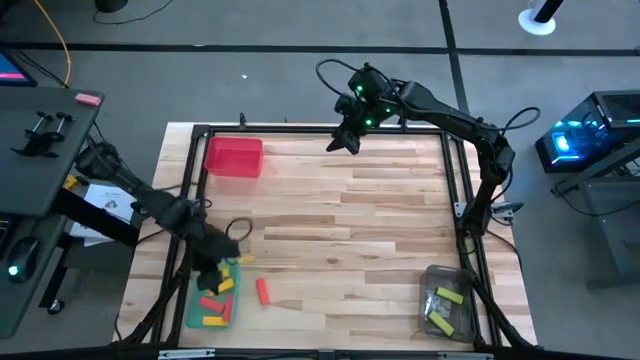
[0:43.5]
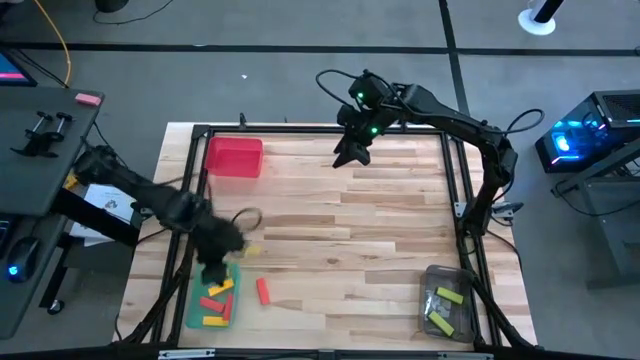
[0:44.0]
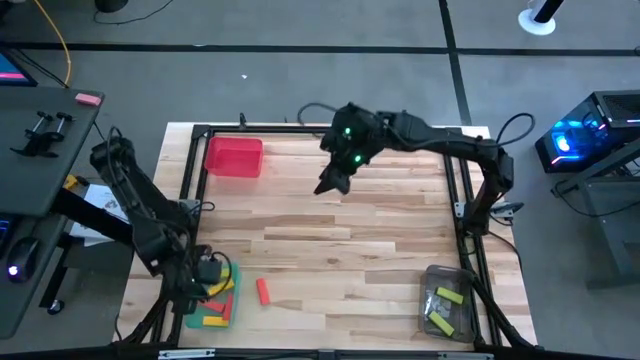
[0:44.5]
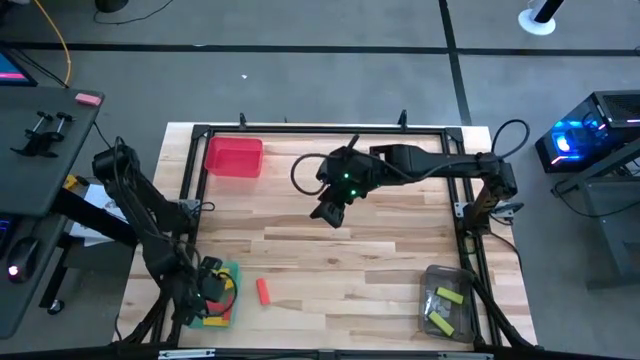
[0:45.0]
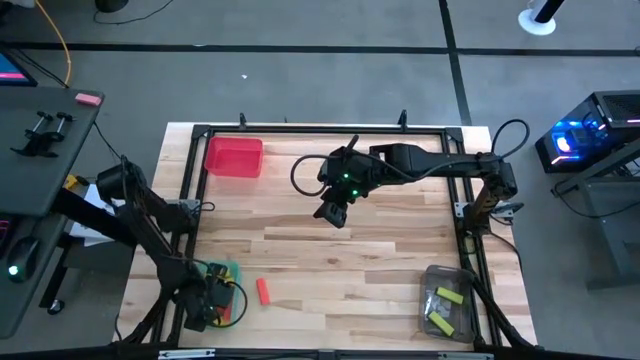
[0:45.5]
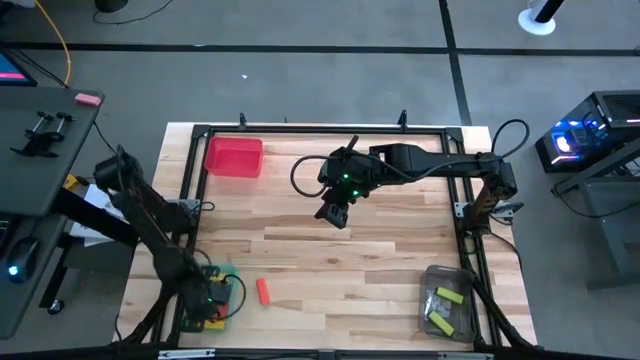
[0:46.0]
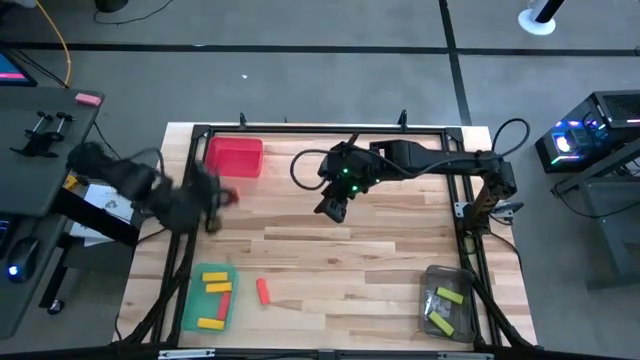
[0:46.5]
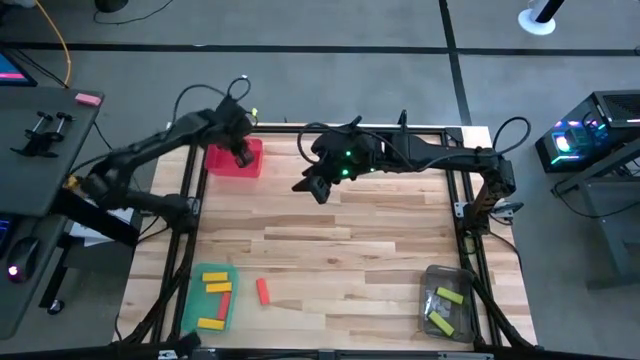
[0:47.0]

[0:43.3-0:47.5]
Task: Sort blocks
Put the left red block into the red bin

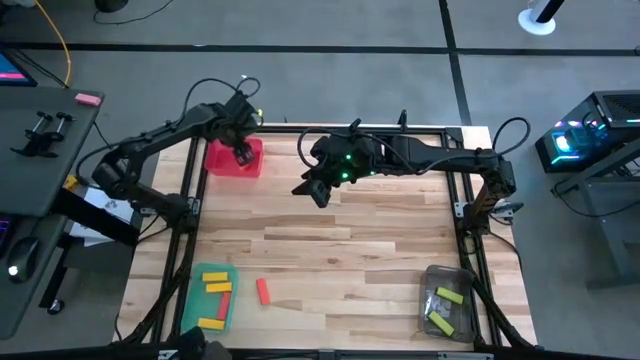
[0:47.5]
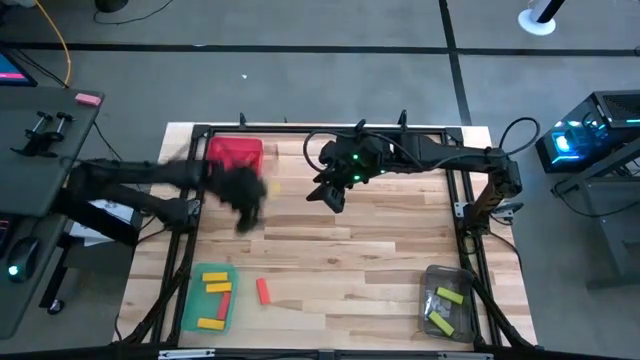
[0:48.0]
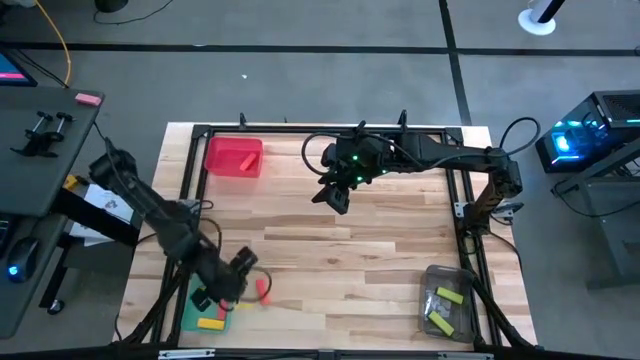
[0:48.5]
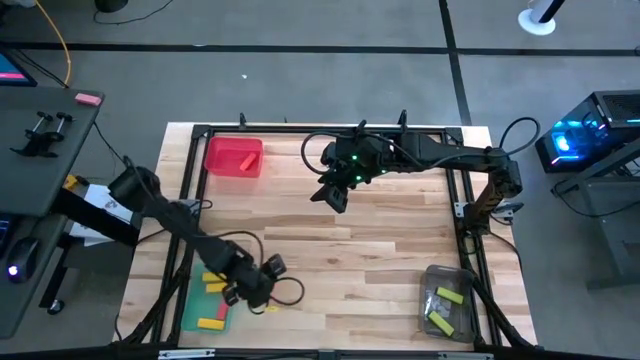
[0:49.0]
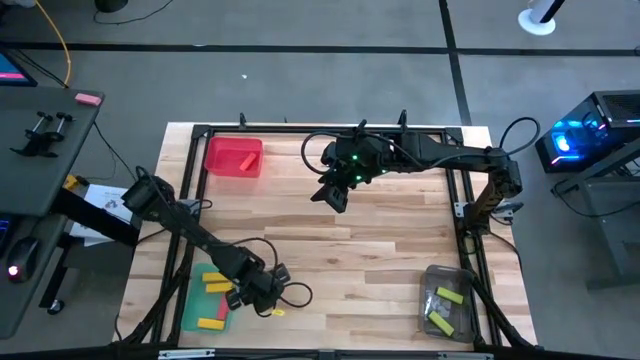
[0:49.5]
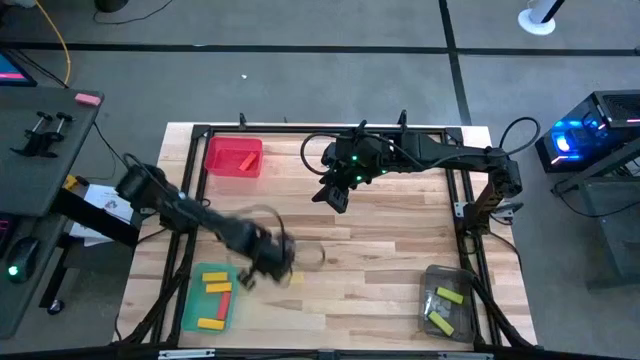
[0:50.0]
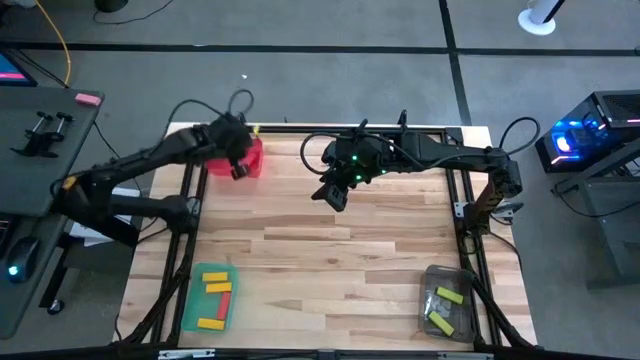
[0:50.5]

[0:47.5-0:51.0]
Put the red block into the red bin

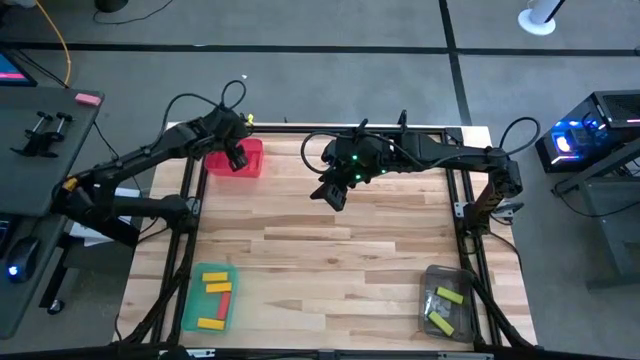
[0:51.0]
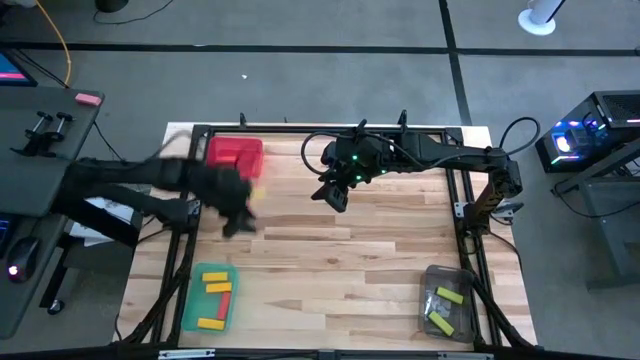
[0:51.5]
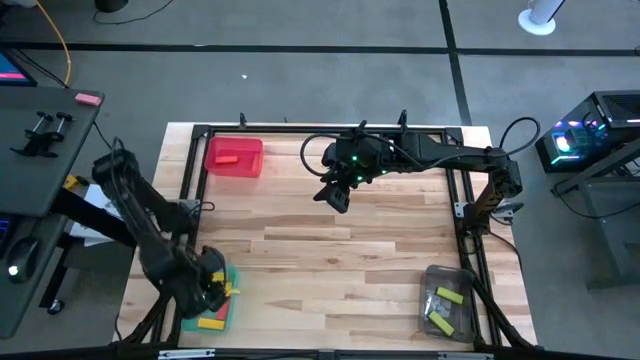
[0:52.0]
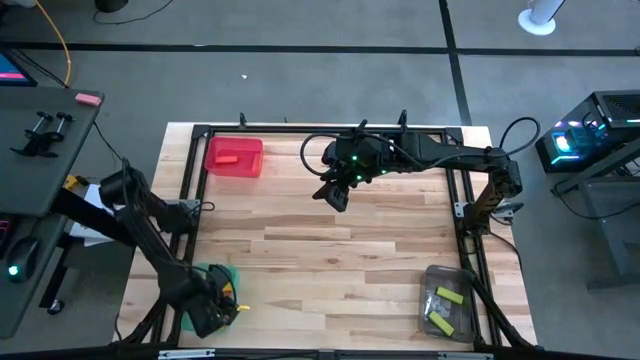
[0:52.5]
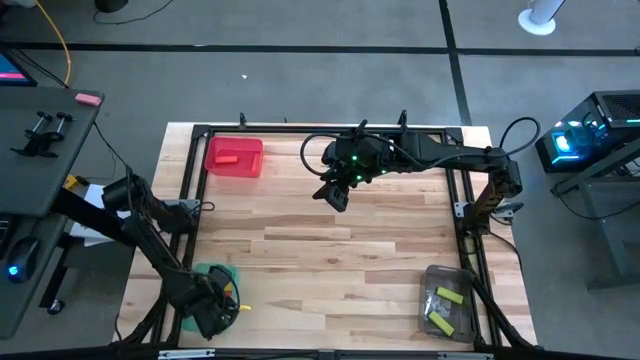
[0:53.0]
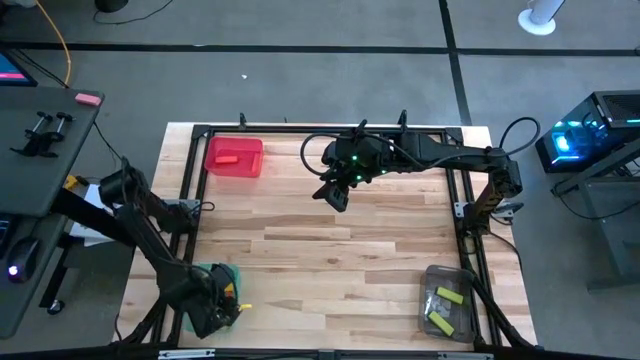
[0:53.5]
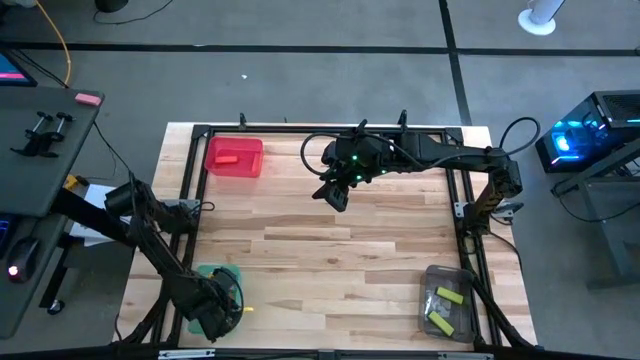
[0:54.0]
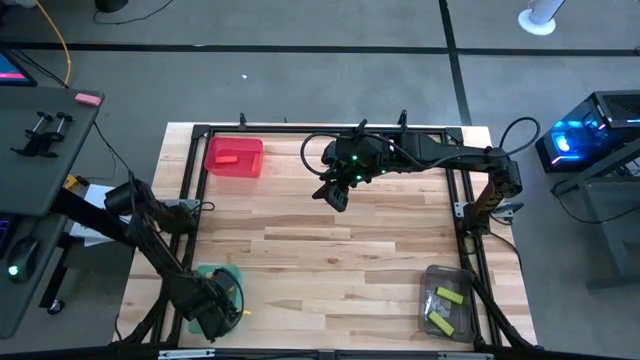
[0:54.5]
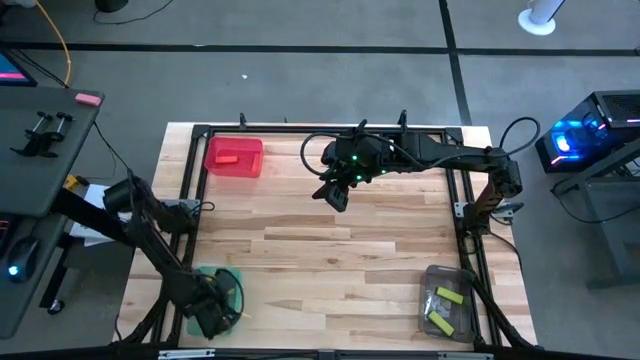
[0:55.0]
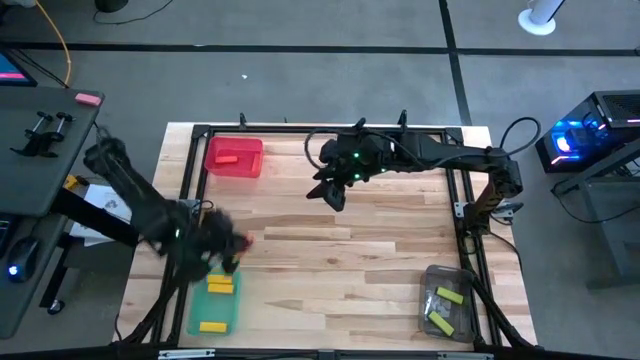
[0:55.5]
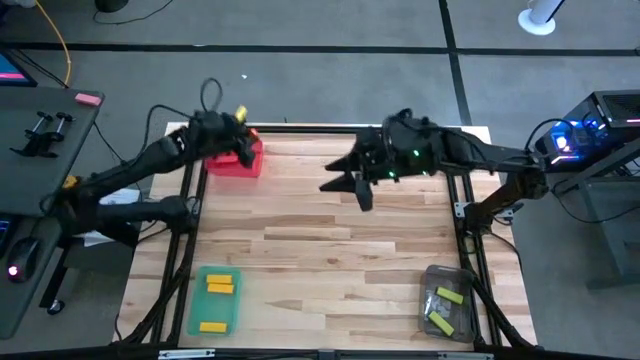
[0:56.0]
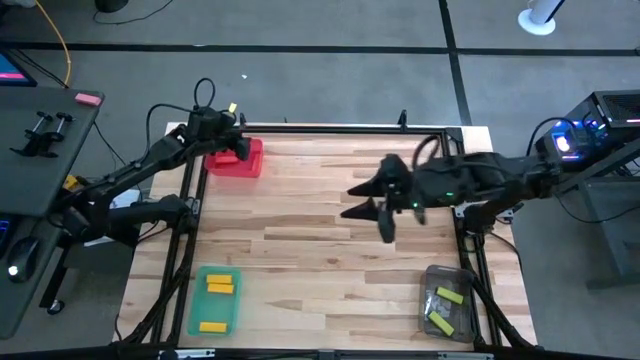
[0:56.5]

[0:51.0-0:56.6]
Put the red block into the red bin

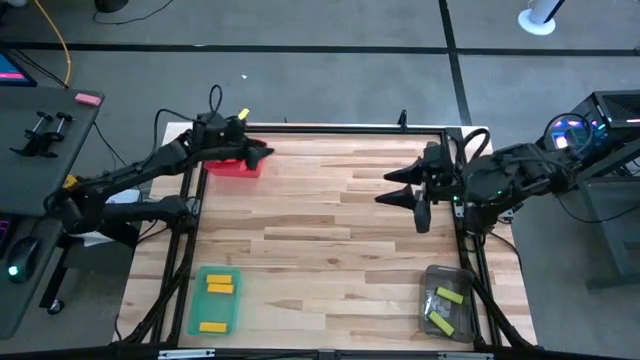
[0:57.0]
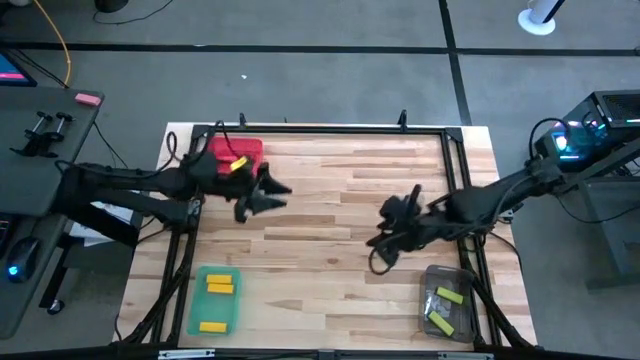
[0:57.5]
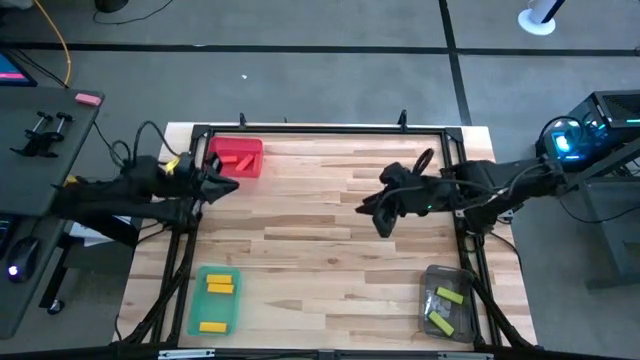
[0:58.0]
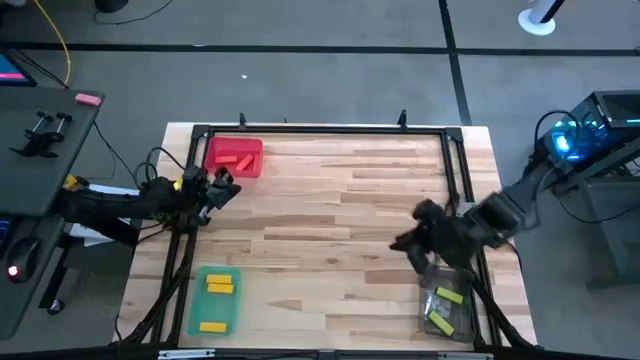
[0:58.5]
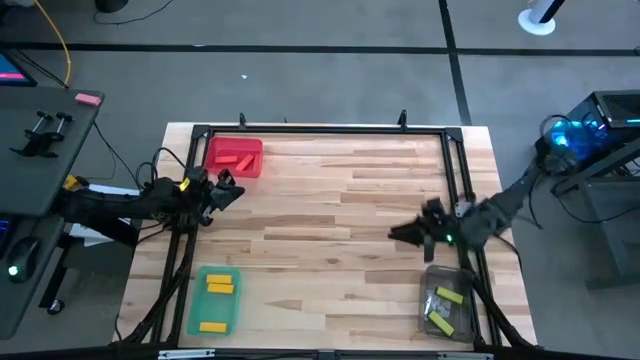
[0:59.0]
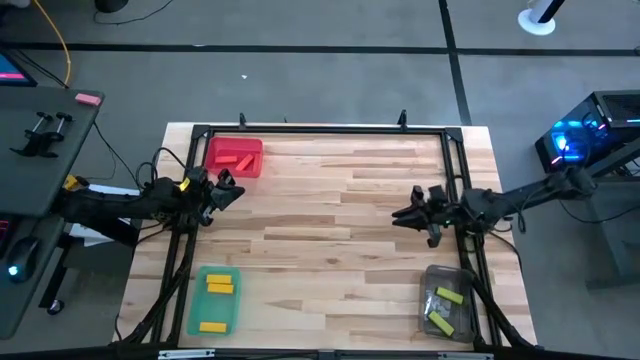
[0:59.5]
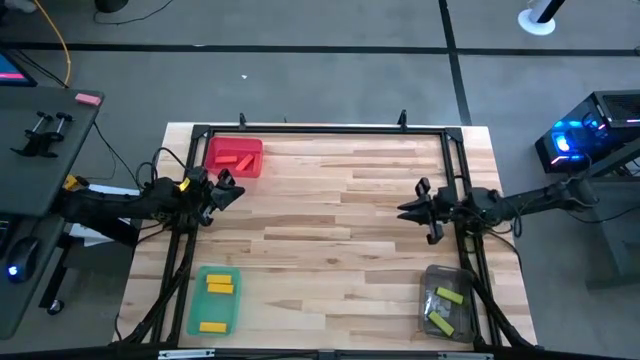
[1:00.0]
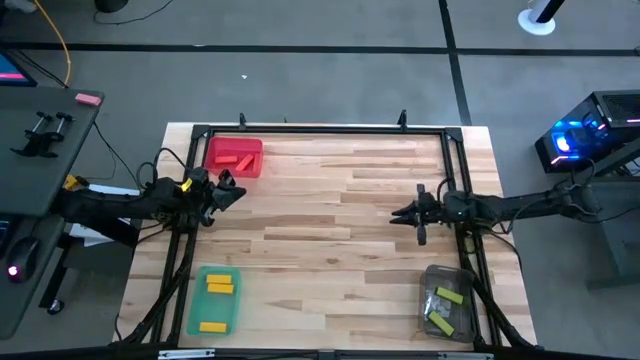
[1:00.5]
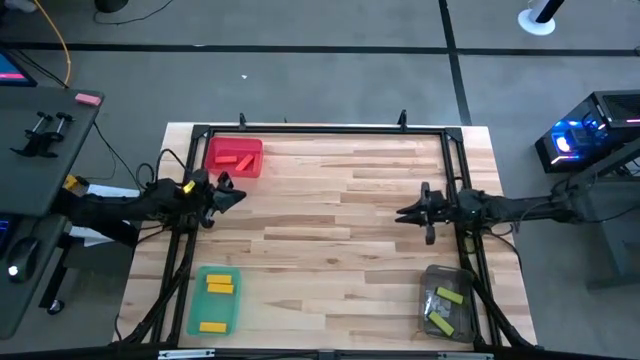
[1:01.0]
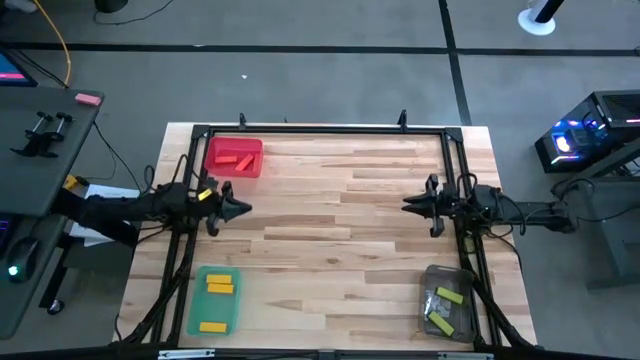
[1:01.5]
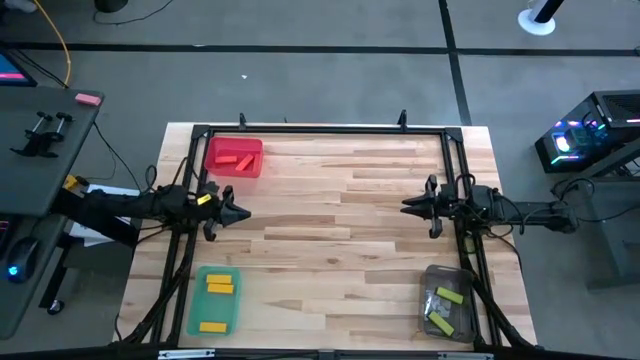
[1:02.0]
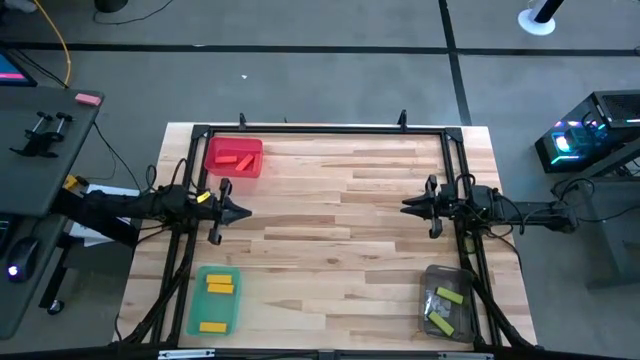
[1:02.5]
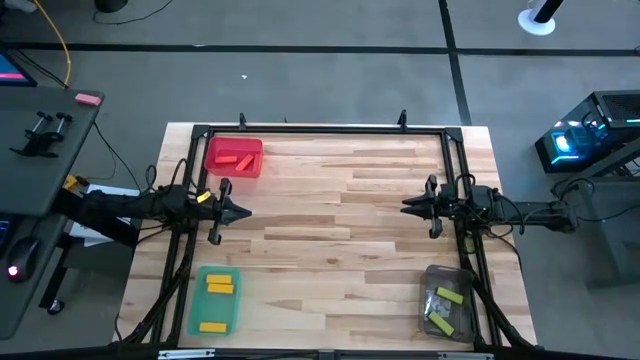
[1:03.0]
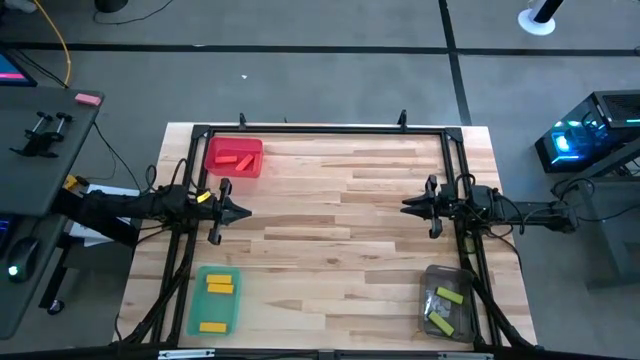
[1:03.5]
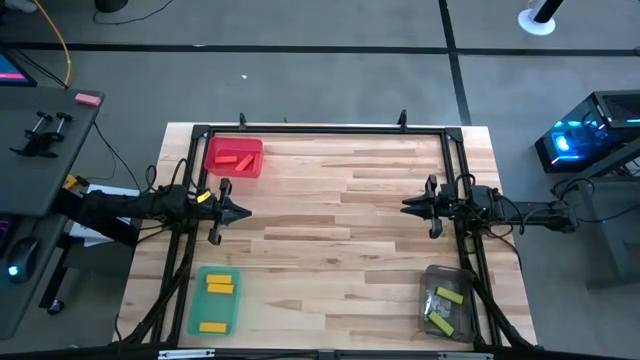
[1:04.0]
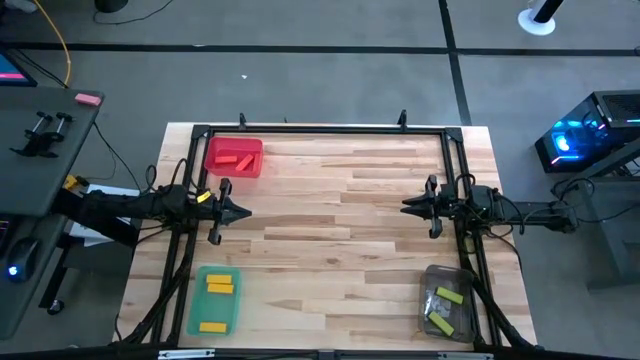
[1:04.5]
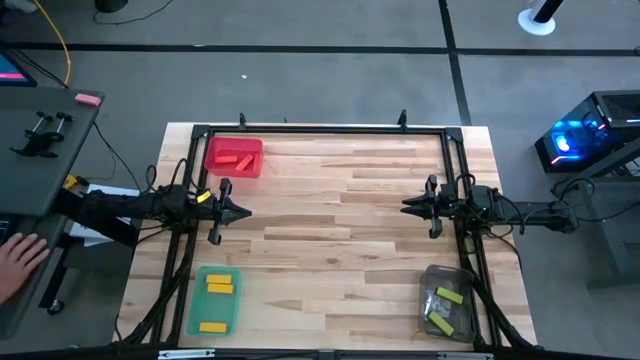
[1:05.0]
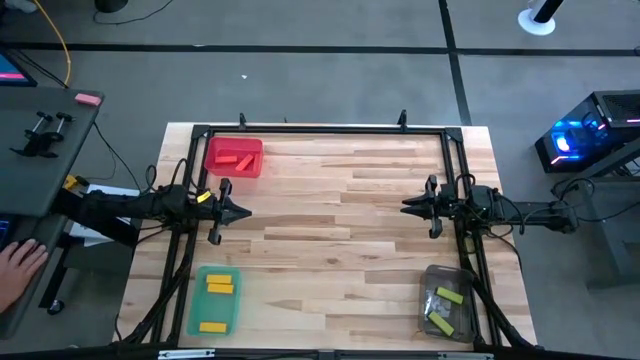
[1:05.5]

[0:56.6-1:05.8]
Return to Home Position
